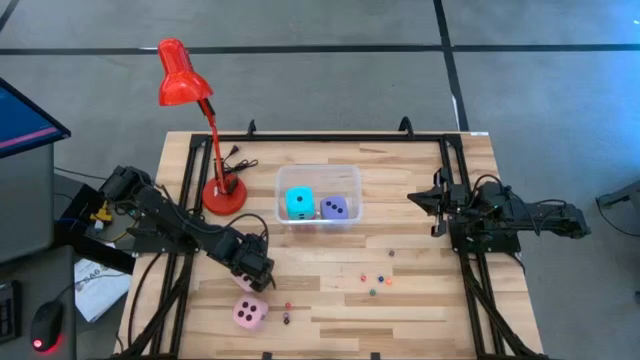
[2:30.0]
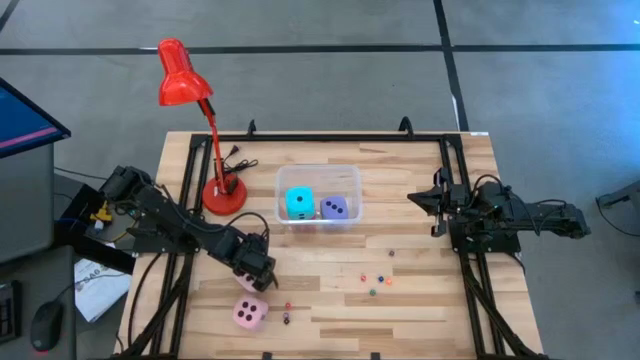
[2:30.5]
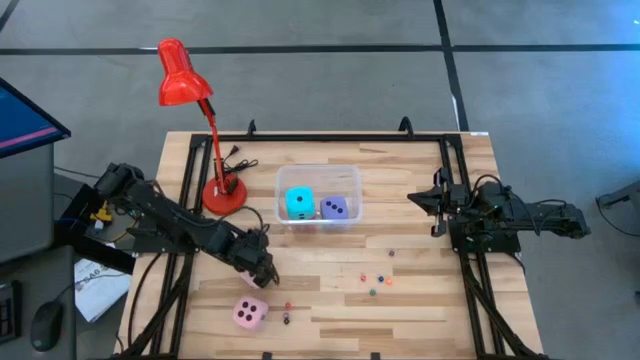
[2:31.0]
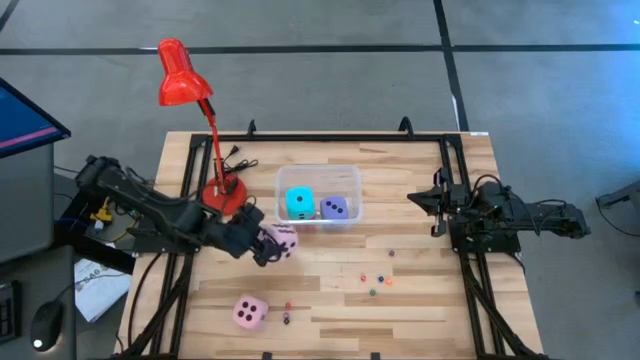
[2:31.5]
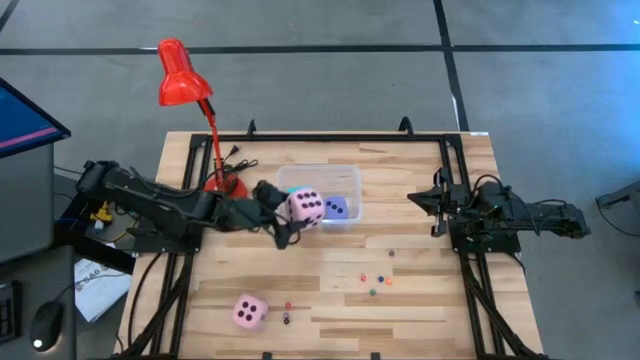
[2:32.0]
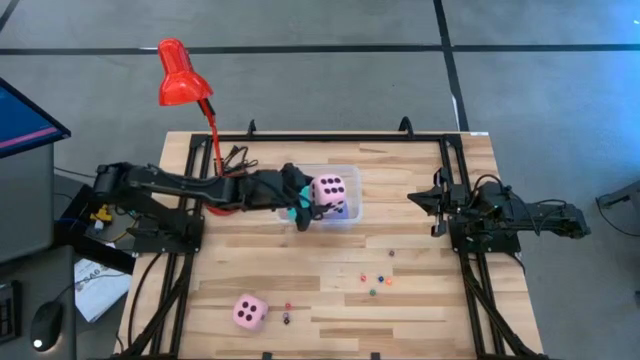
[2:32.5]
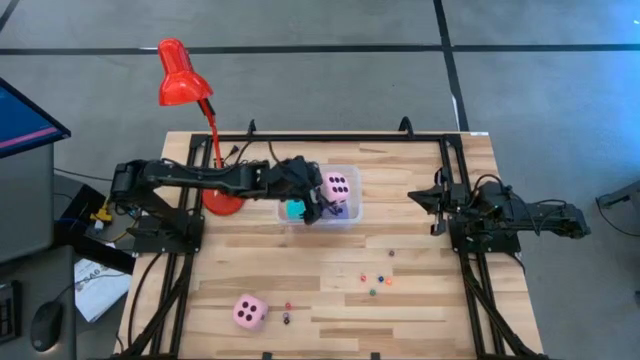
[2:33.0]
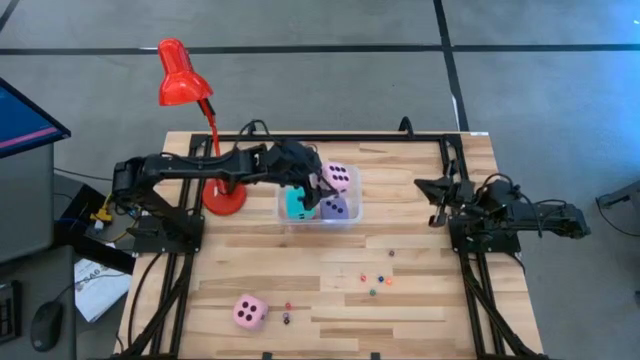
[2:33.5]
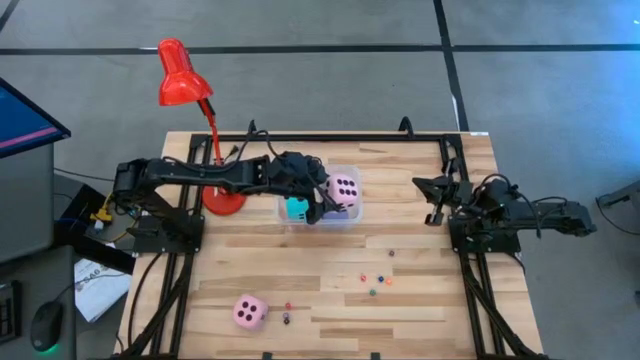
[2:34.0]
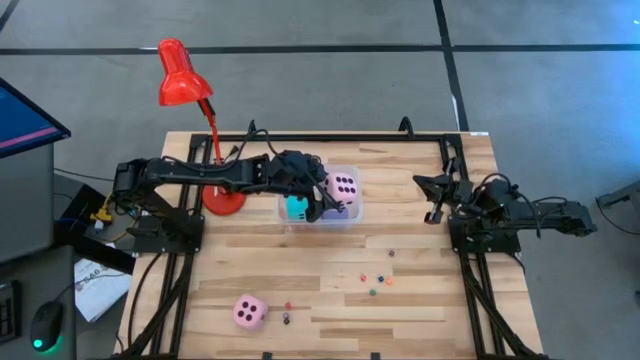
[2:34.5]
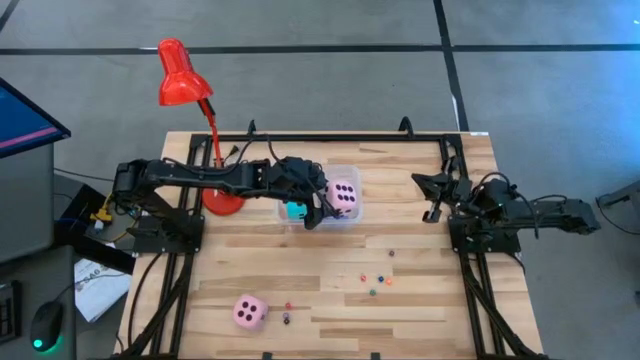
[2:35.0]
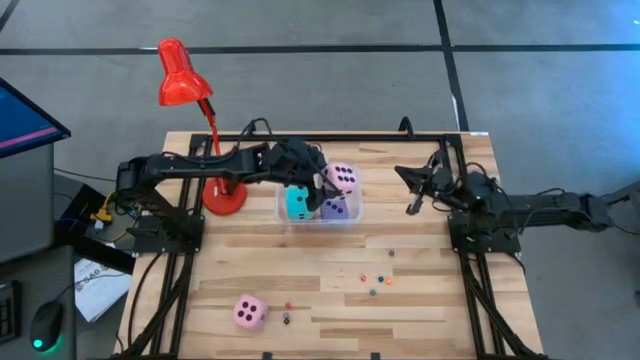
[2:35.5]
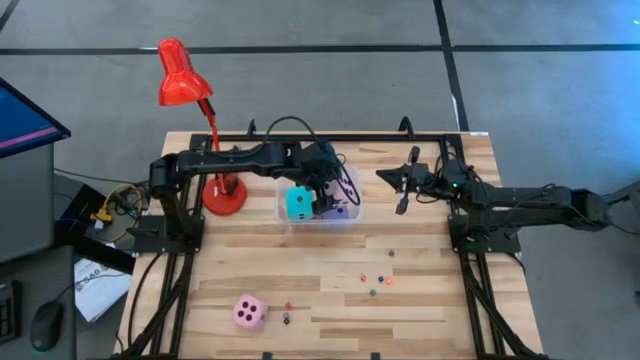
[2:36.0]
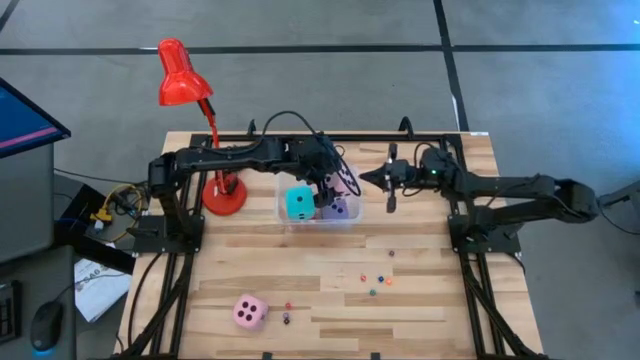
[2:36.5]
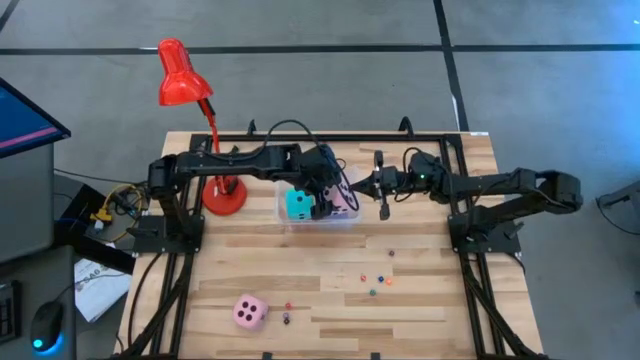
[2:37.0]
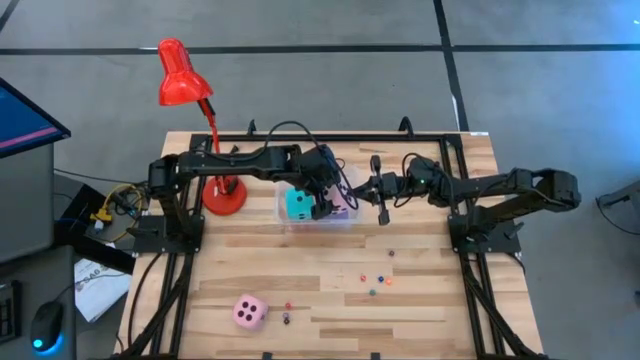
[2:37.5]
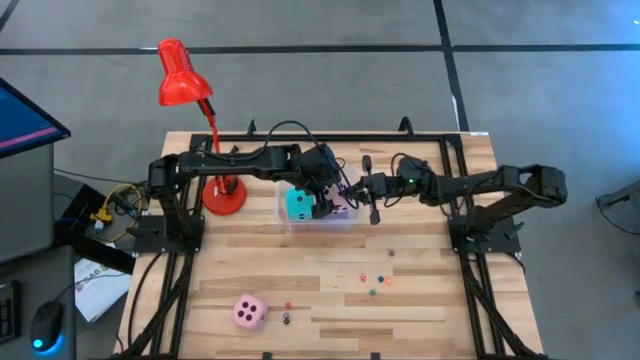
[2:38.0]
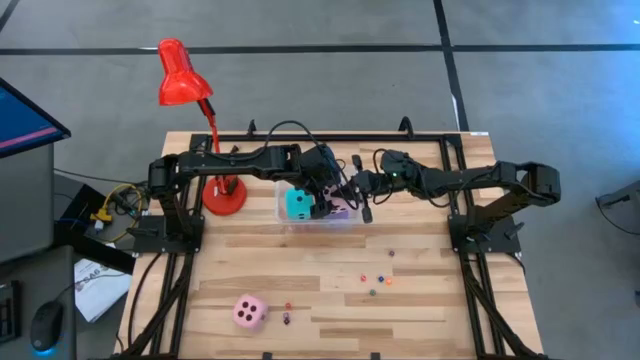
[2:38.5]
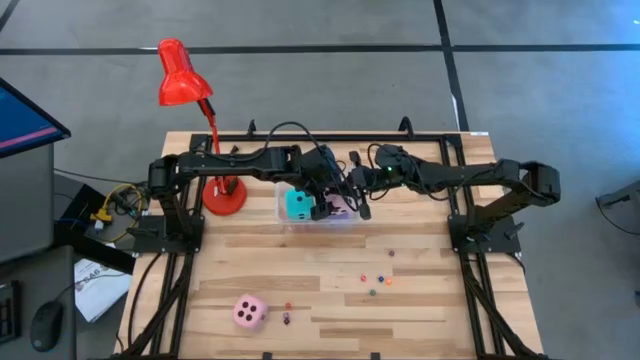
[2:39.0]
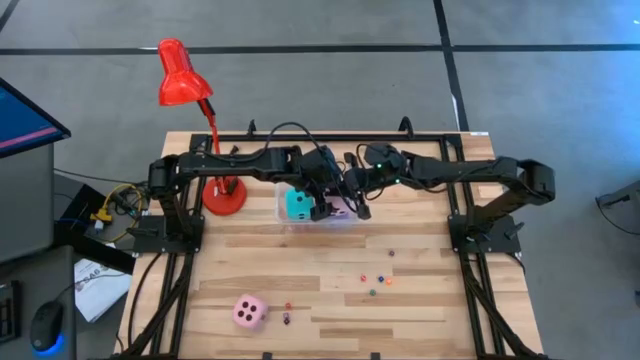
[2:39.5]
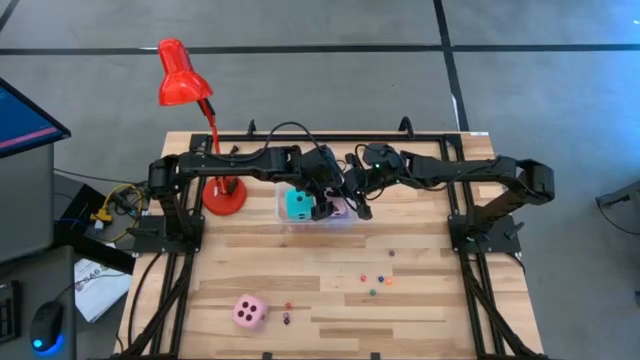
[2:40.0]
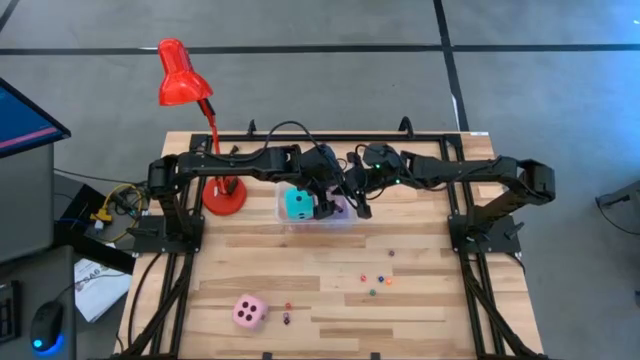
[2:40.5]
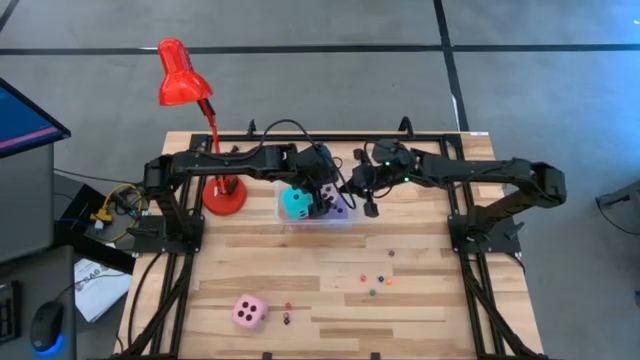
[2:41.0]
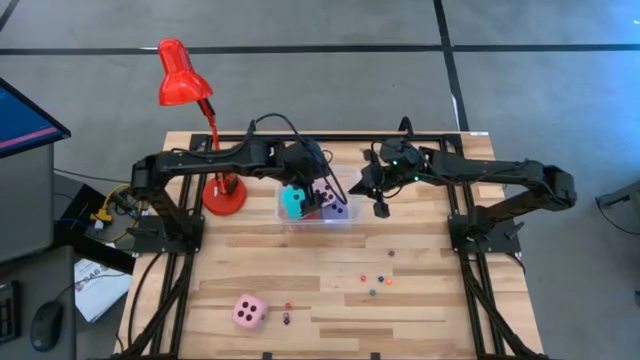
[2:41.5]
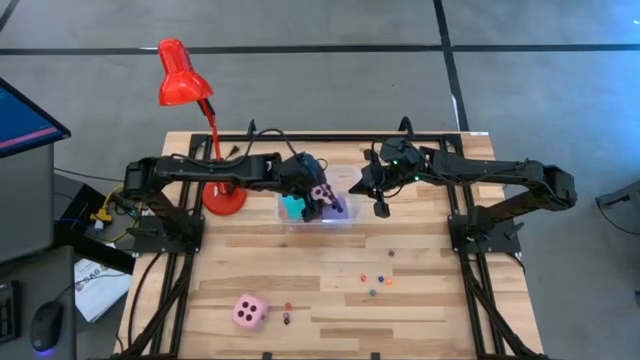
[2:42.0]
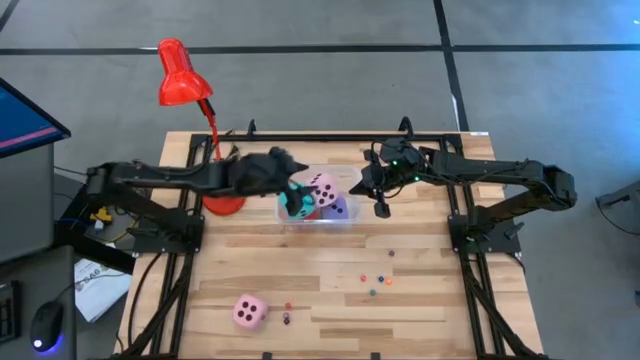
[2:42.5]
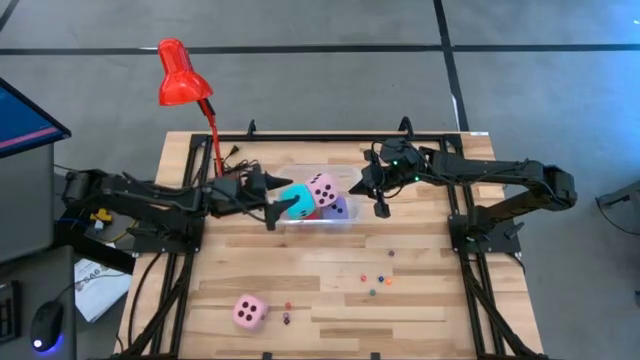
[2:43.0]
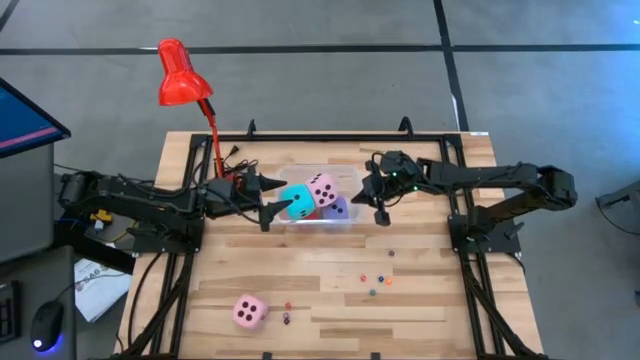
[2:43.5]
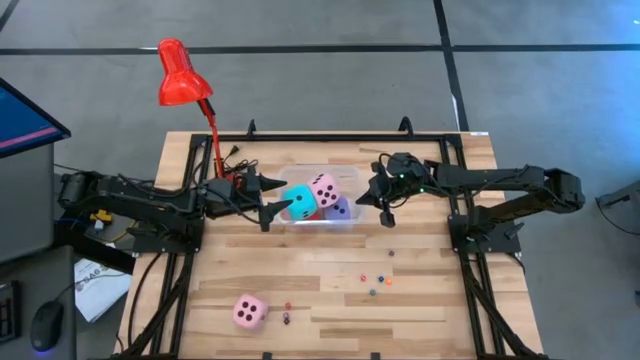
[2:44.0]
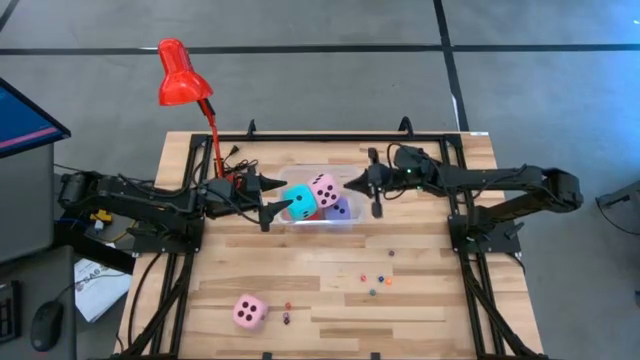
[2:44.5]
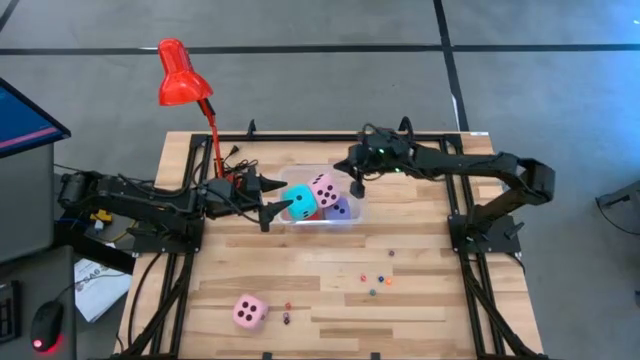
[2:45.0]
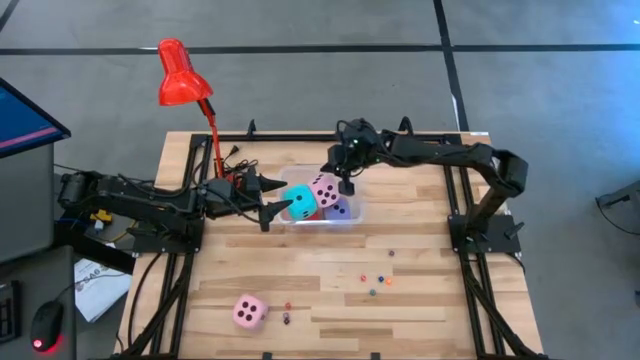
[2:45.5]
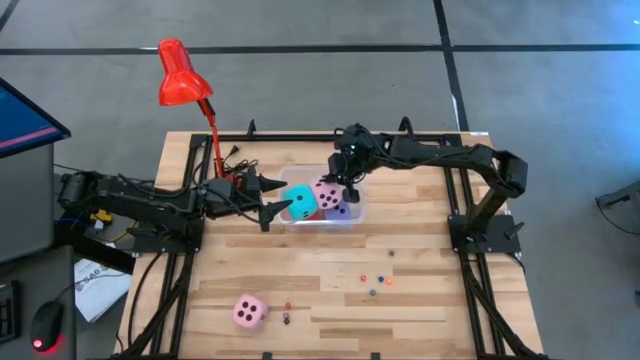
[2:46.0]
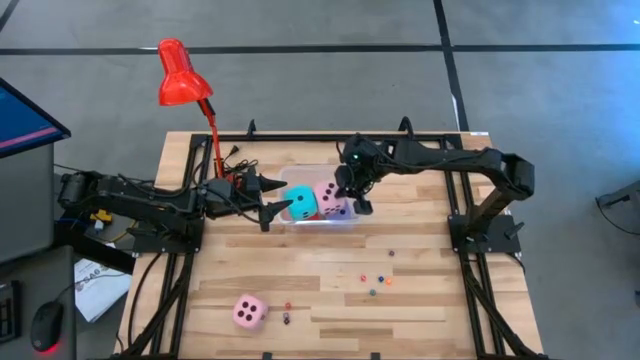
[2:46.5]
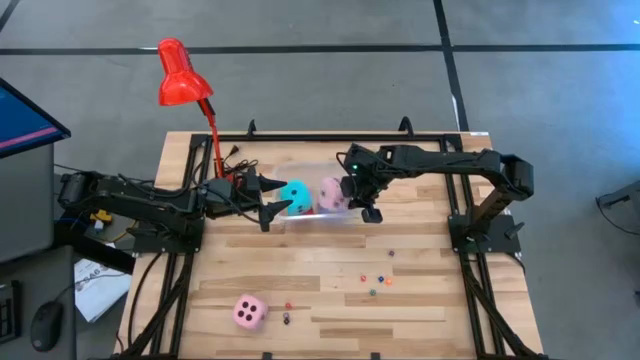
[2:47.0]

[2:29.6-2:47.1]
Task: Pick & Place Dice
Put the large pink die into the transparent bin

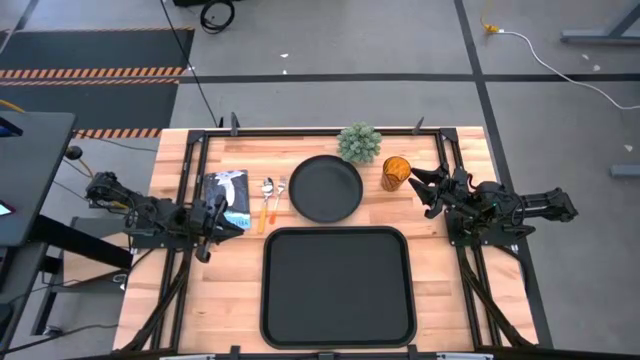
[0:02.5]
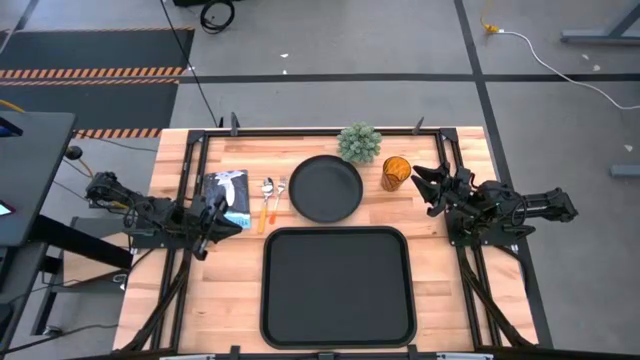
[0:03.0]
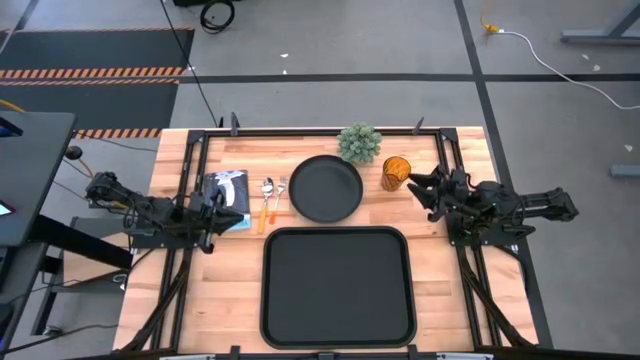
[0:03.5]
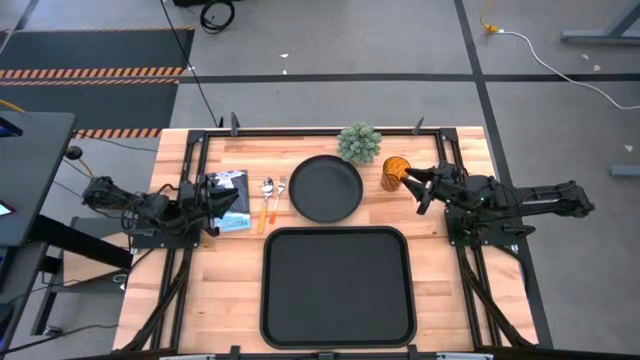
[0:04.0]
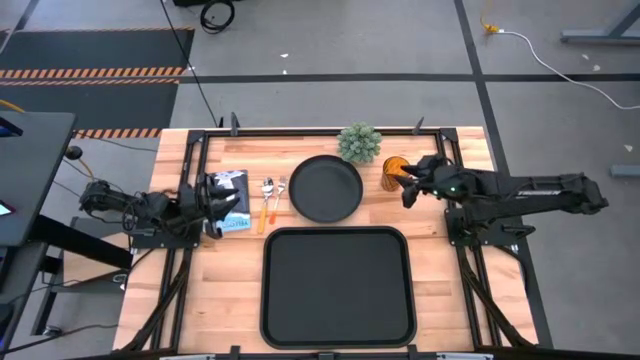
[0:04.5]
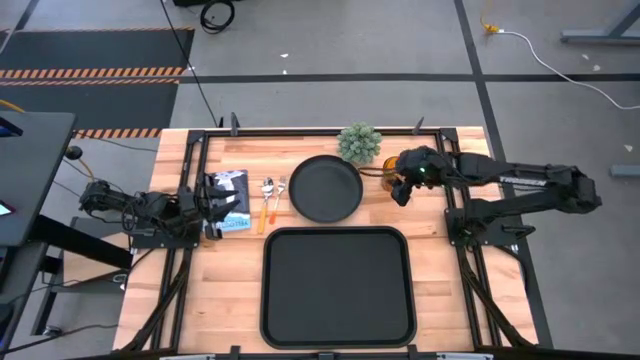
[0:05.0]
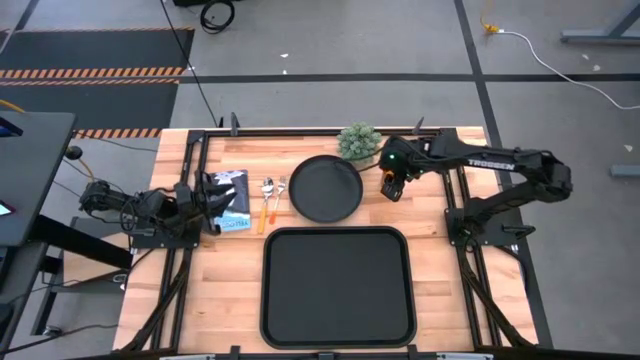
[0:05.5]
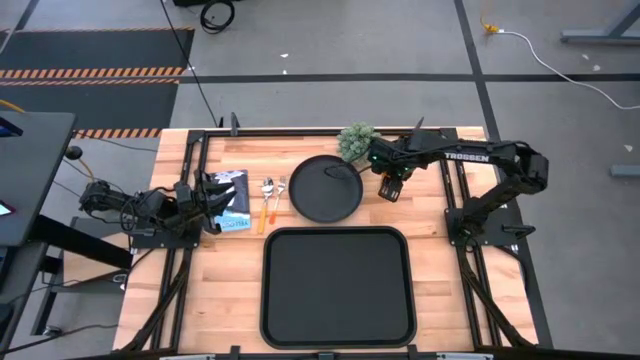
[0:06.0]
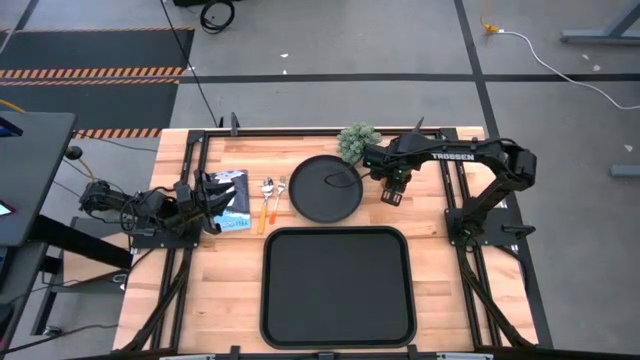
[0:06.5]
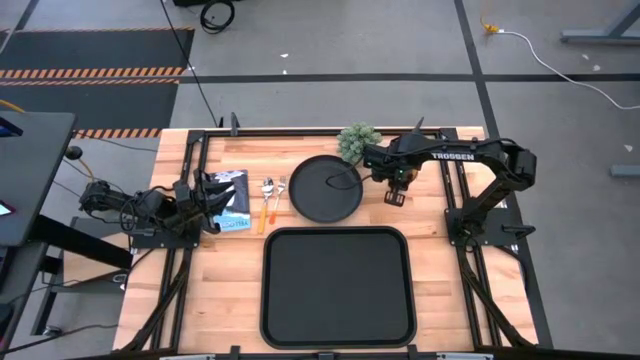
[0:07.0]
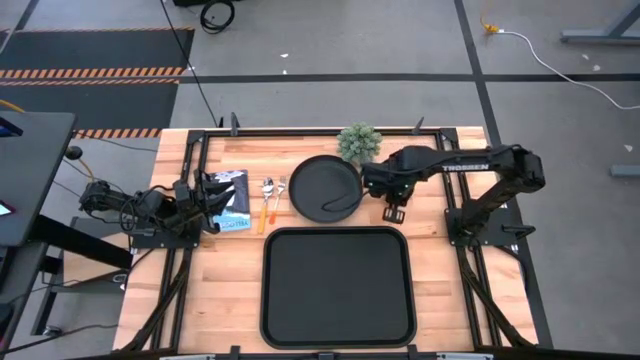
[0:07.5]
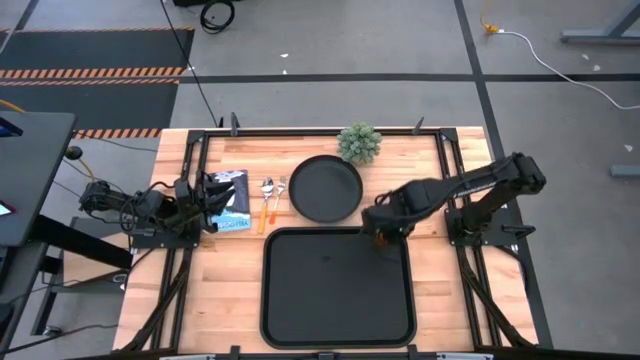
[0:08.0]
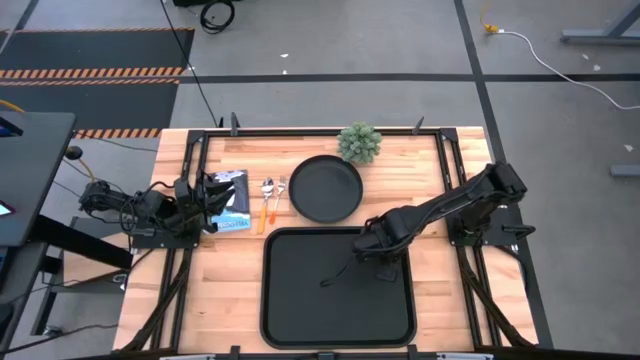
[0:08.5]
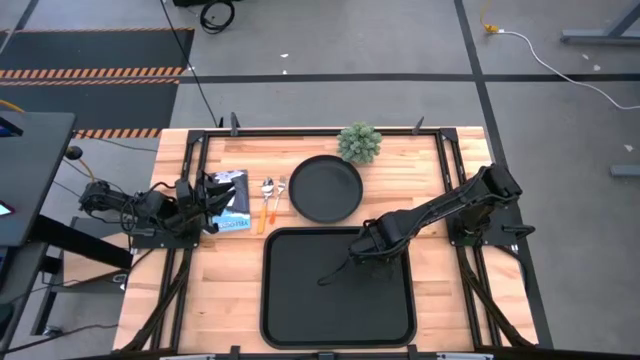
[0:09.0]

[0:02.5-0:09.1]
Task: Pick and place plate/cup/fork/spoon on tray
Put the brown cup on the black tray
